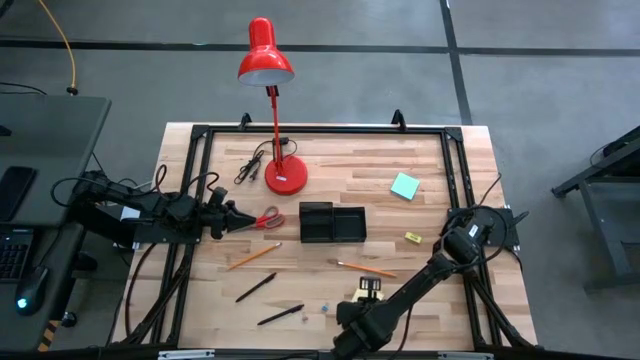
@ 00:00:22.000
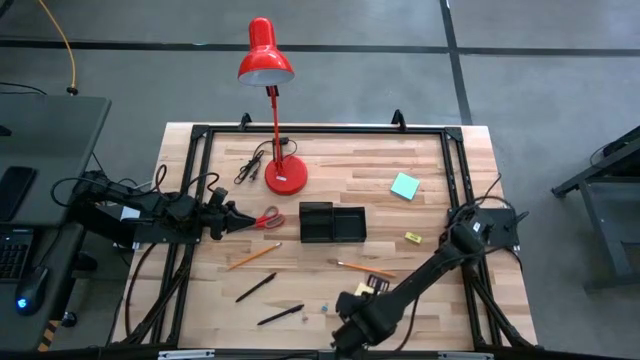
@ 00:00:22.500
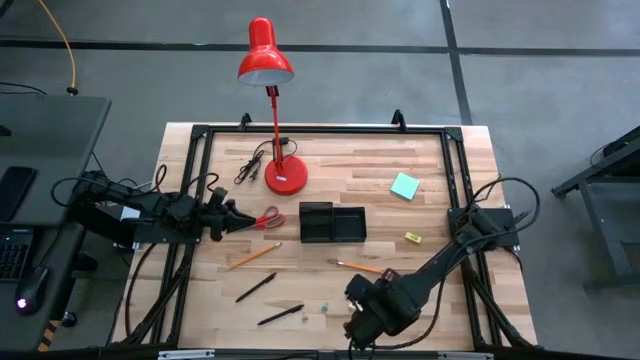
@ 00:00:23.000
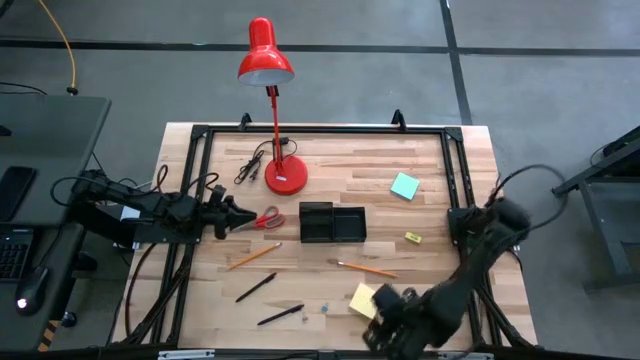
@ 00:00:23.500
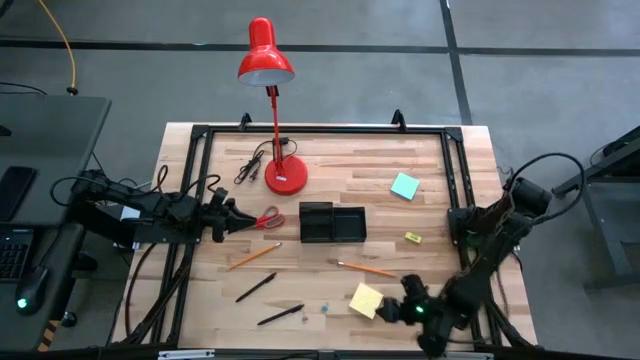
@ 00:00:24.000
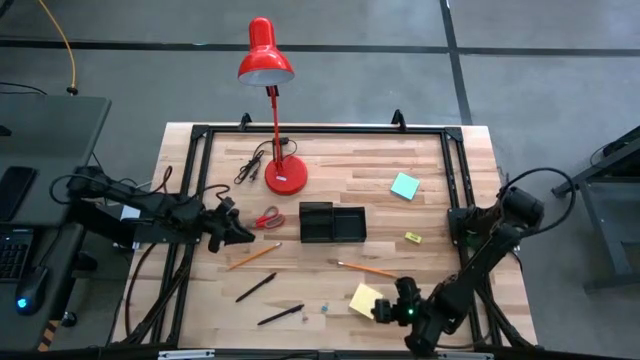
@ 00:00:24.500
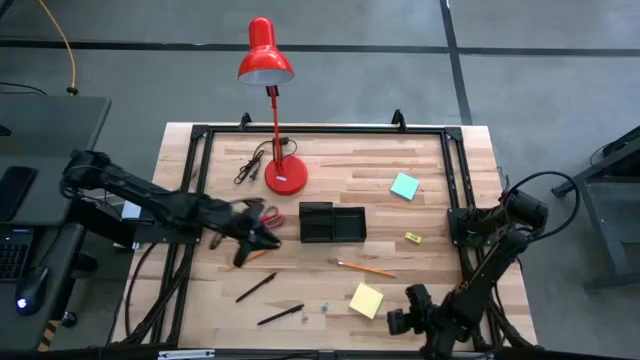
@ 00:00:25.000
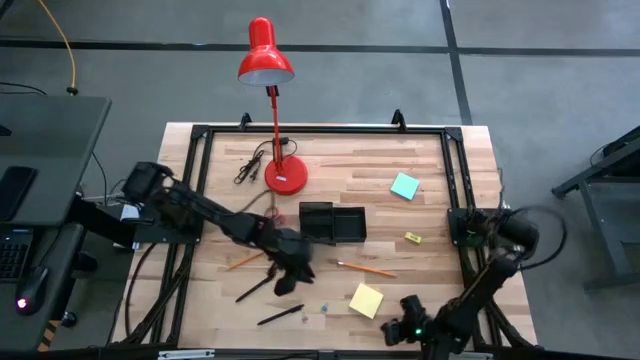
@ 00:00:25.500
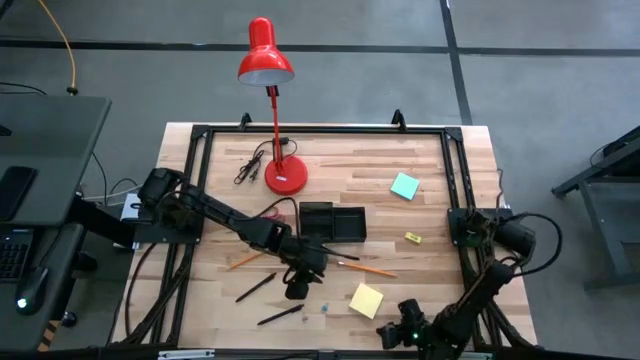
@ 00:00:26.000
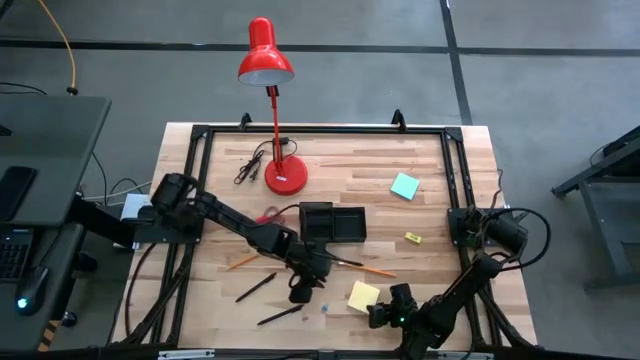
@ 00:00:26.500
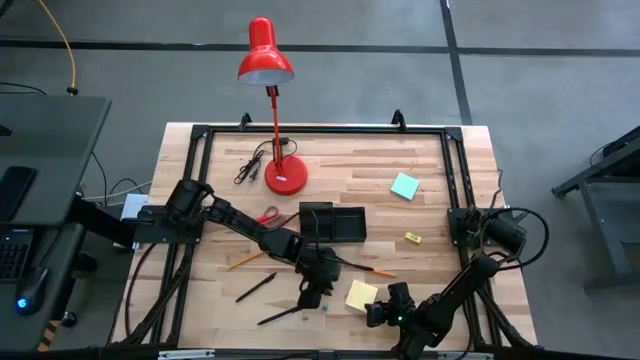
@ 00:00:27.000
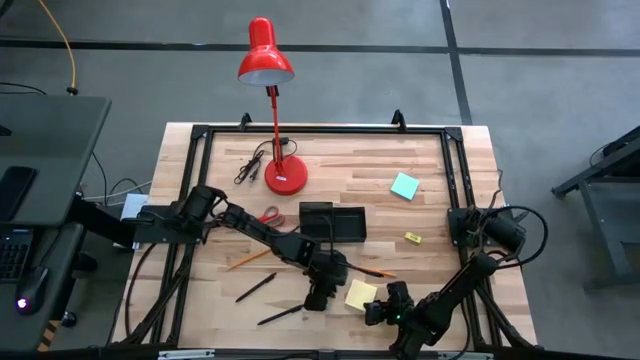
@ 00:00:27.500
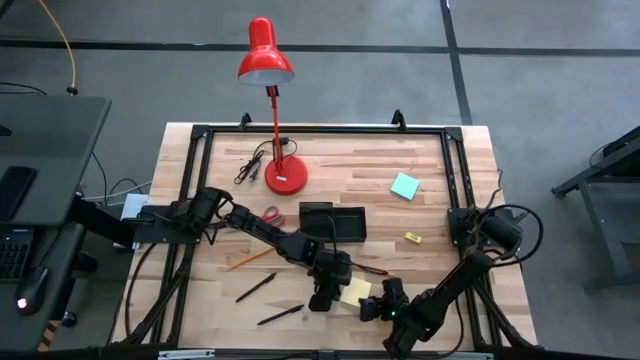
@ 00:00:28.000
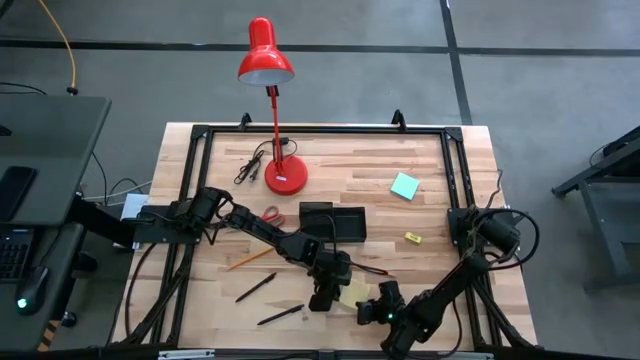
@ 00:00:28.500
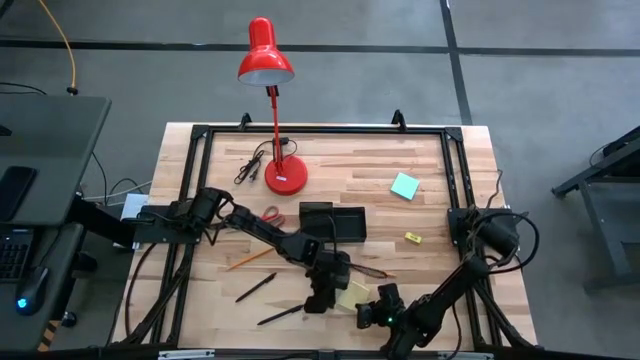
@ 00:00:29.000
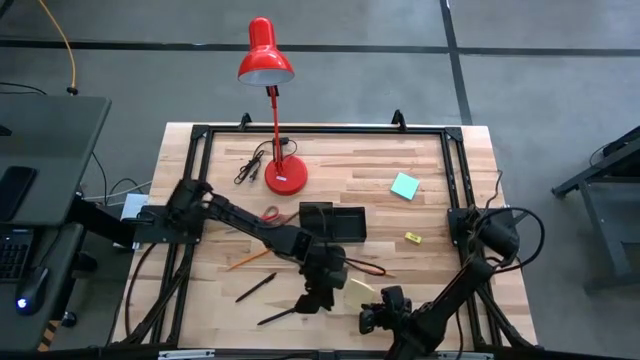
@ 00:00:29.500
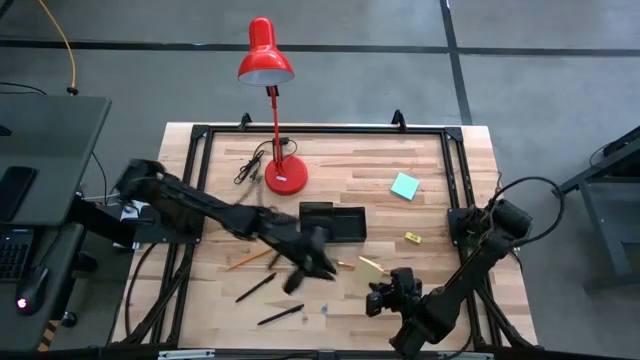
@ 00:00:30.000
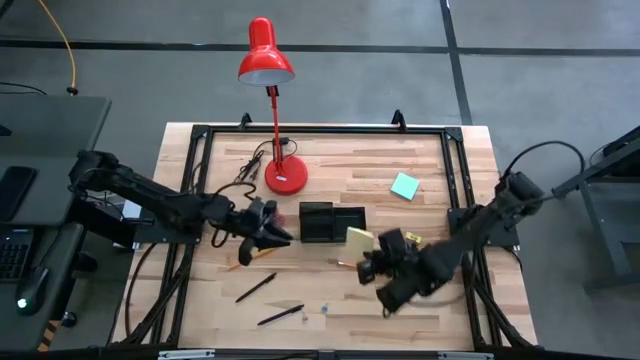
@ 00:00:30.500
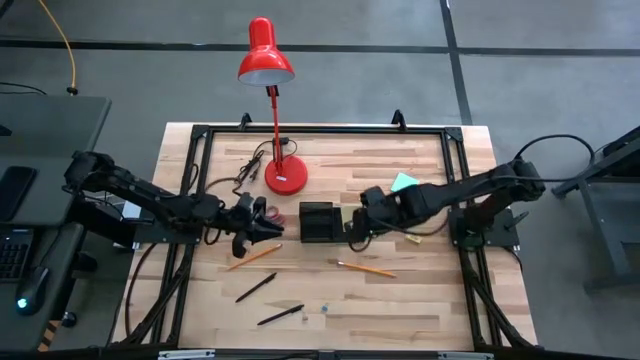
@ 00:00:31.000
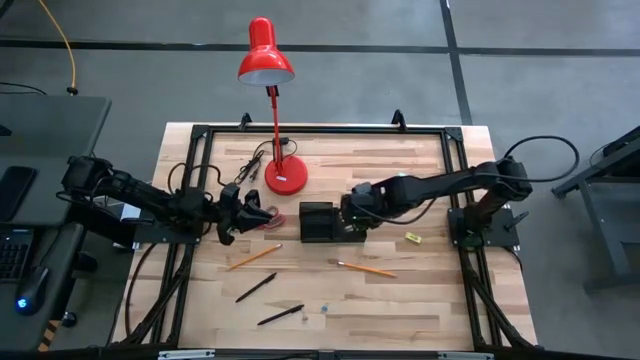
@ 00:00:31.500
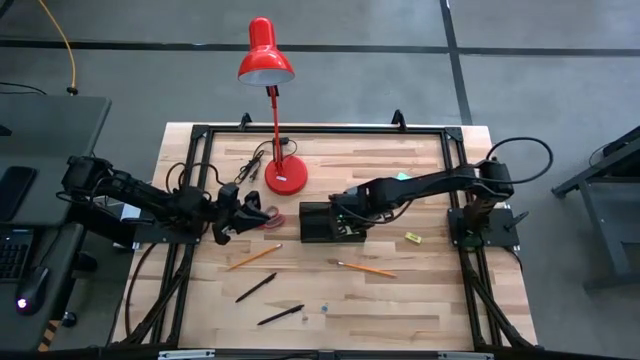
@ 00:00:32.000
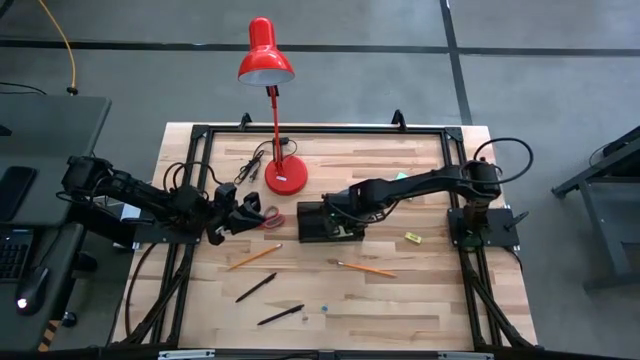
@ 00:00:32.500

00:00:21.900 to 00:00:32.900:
Task: Pick and place office supplies into organizer
Put the yellow sticky notes into the black desk organizer
